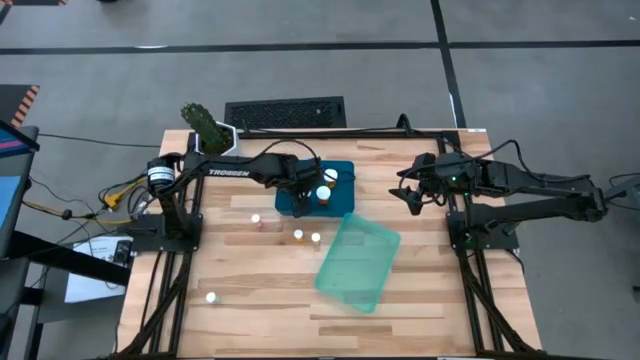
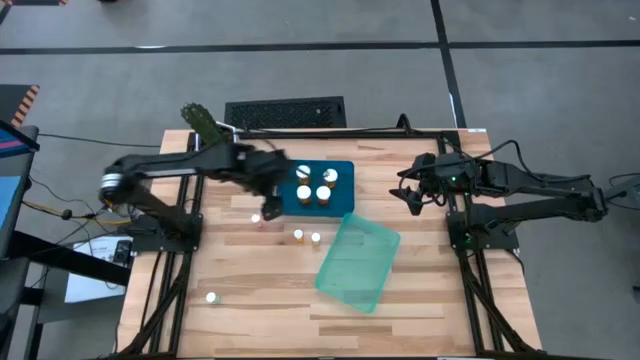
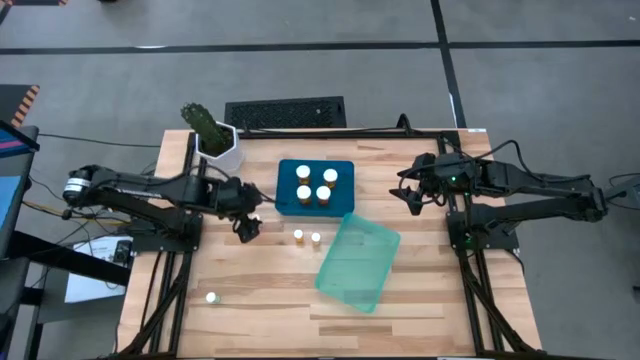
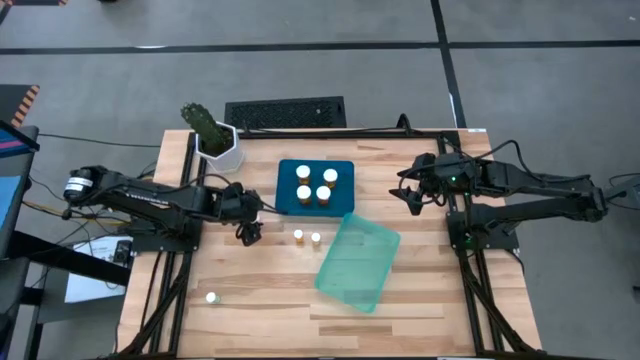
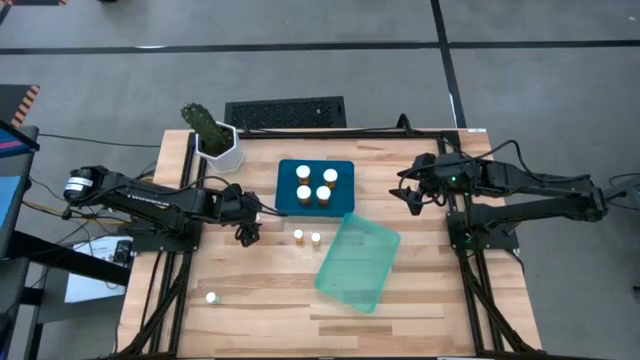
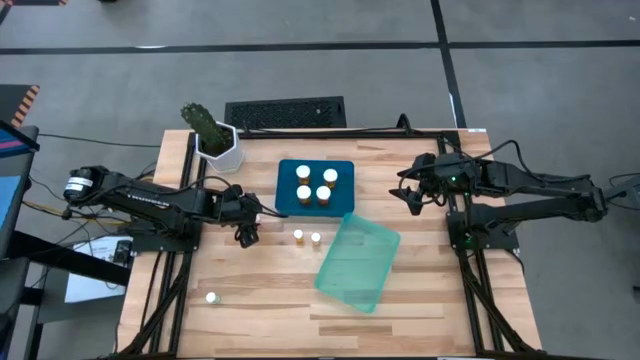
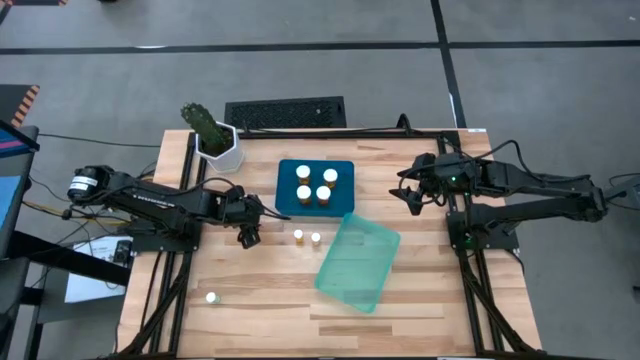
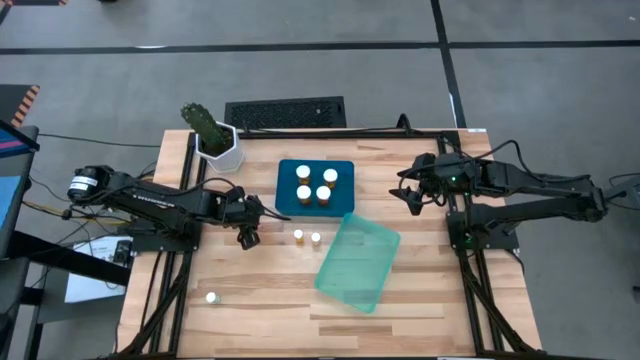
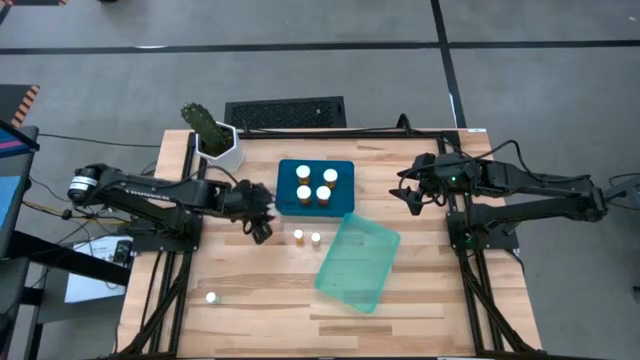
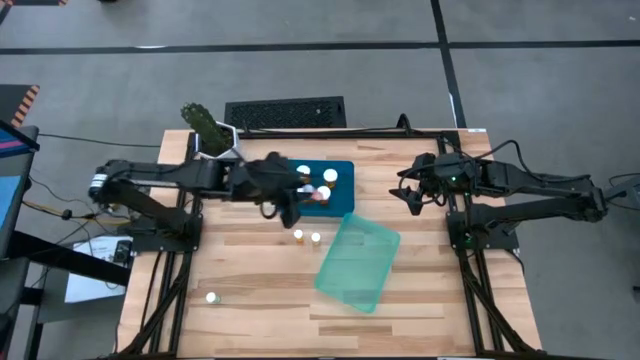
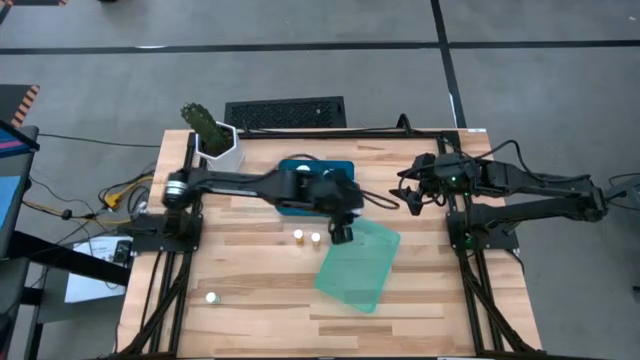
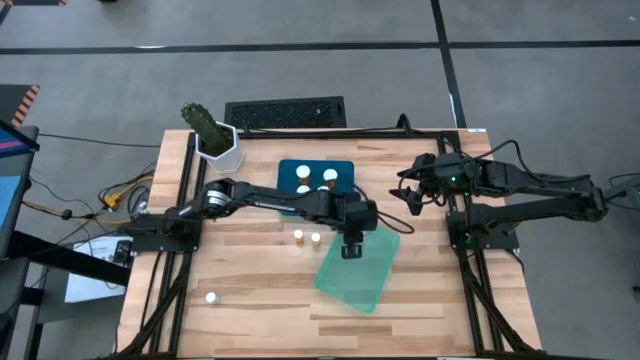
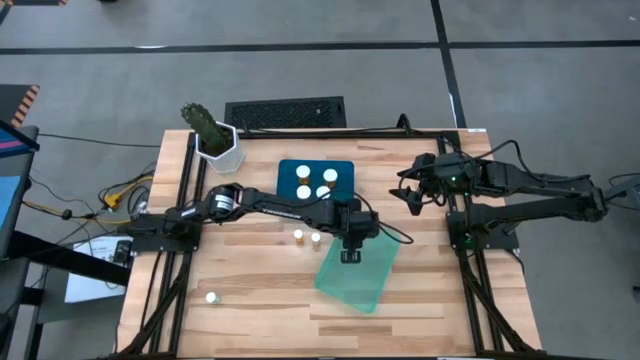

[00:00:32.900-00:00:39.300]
Task: Pick and place medicine bottles into bin by pill shape (circle, oval)
Put the small pink pill bottle into the green bin

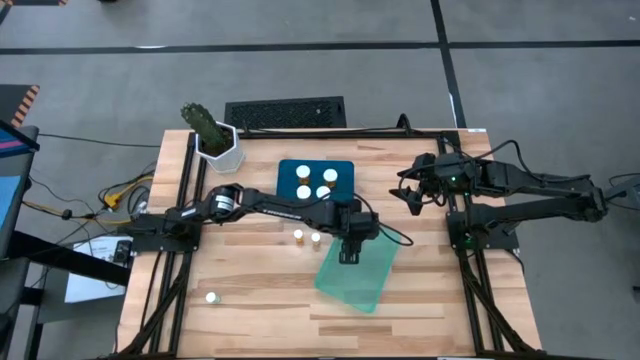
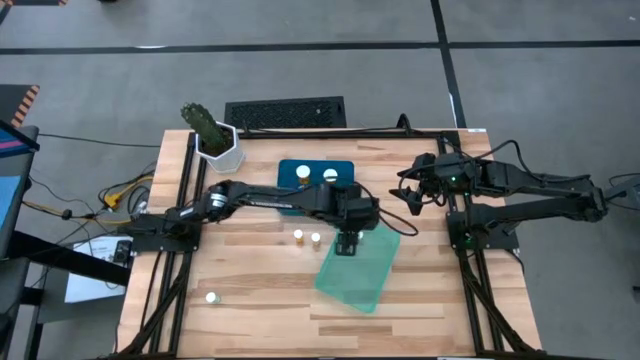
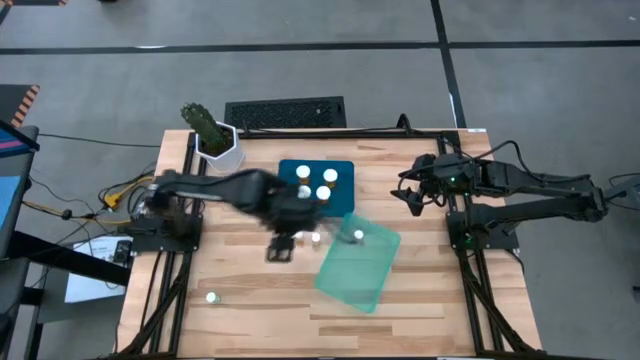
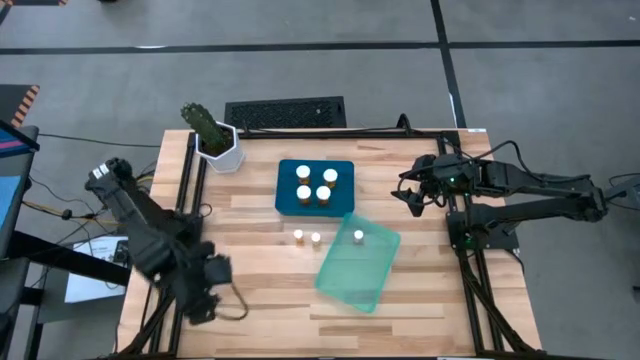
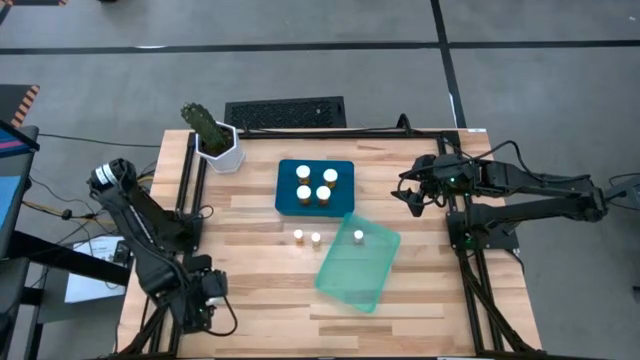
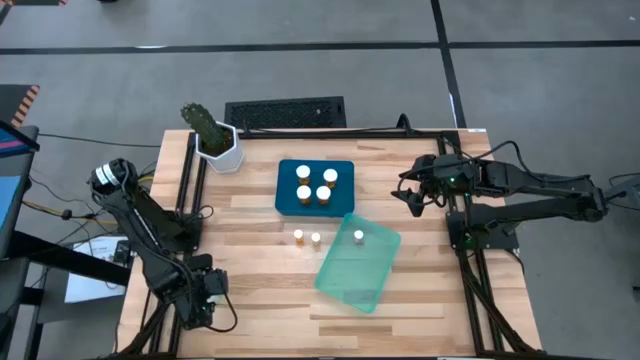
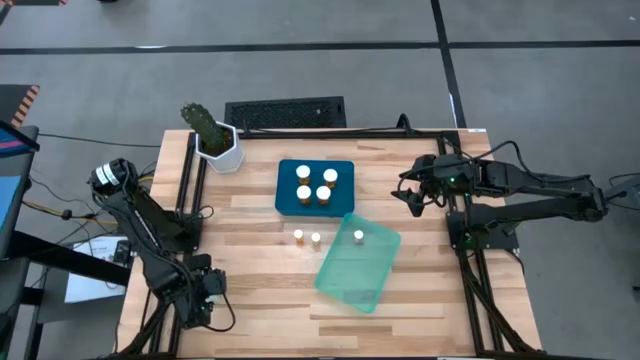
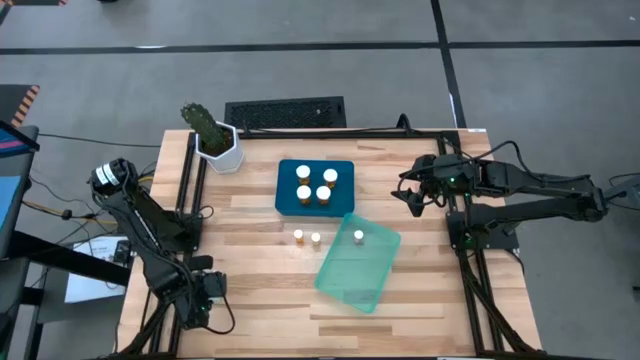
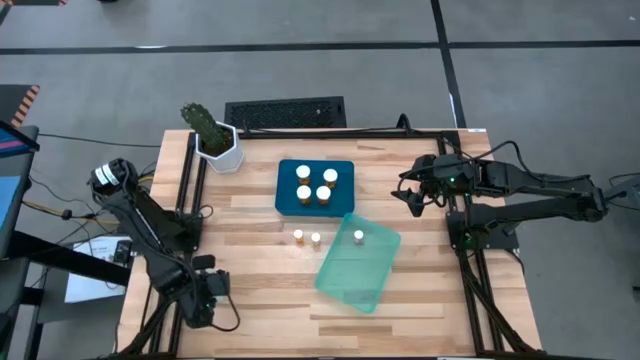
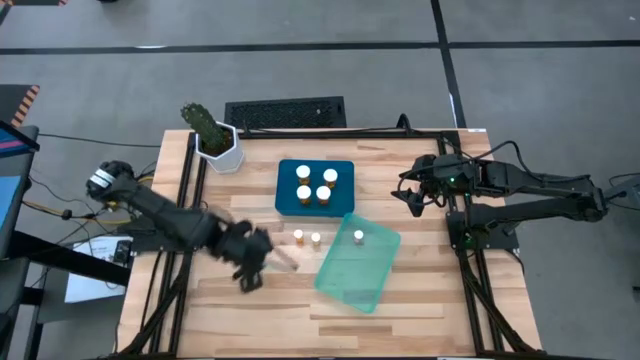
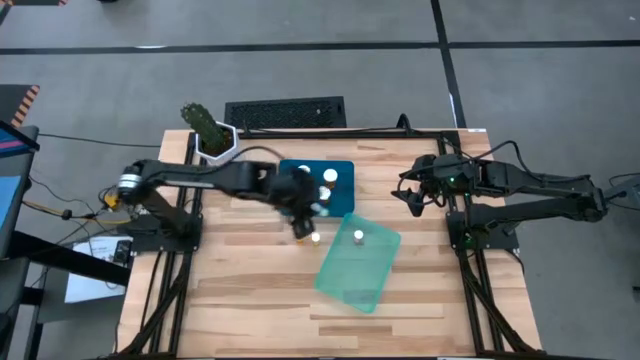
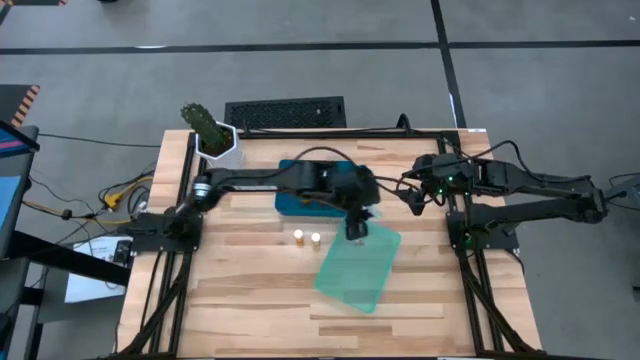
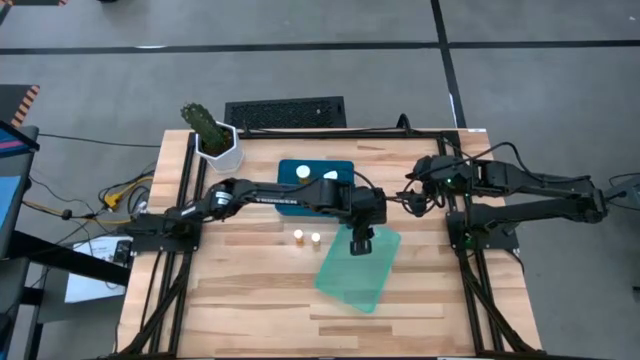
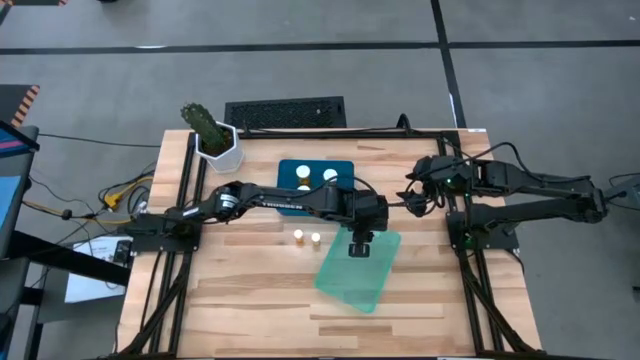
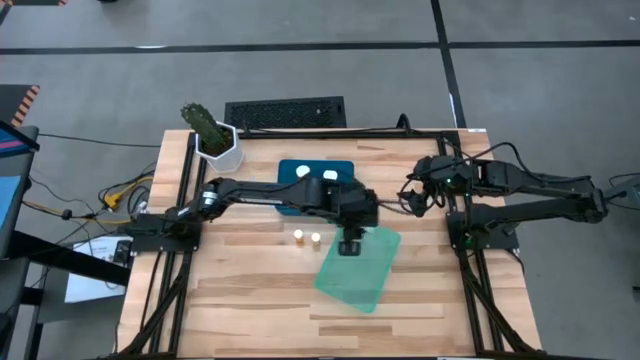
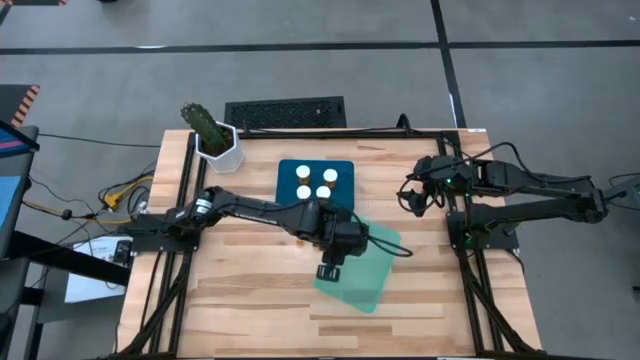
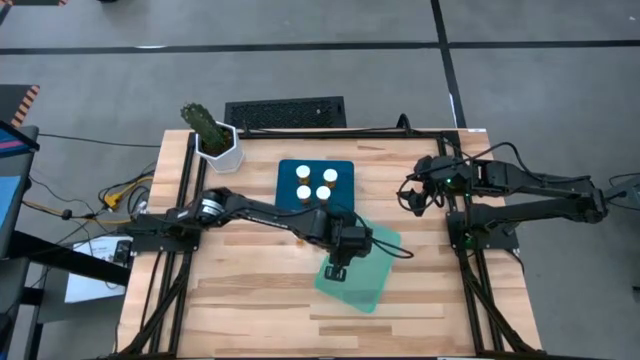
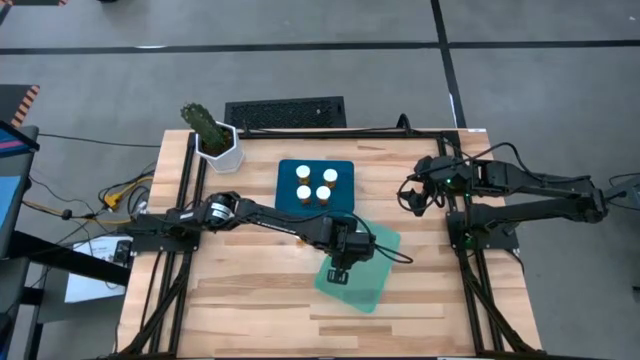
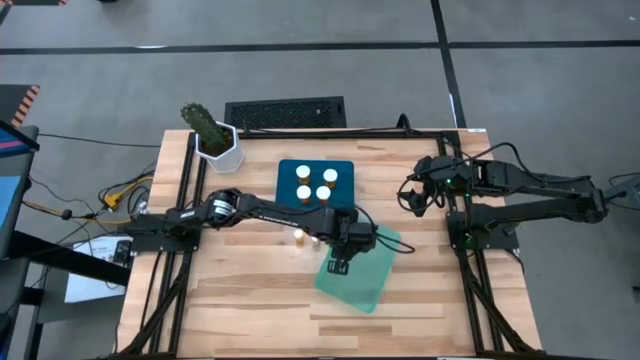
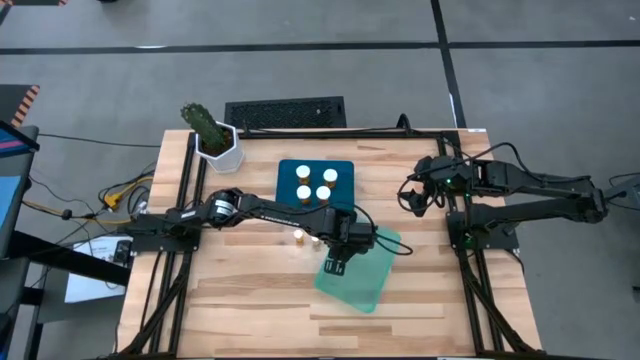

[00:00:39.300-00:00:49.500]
Put the small green pill bottle into the green bin

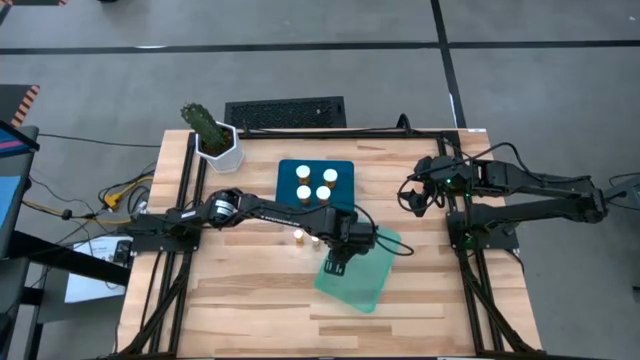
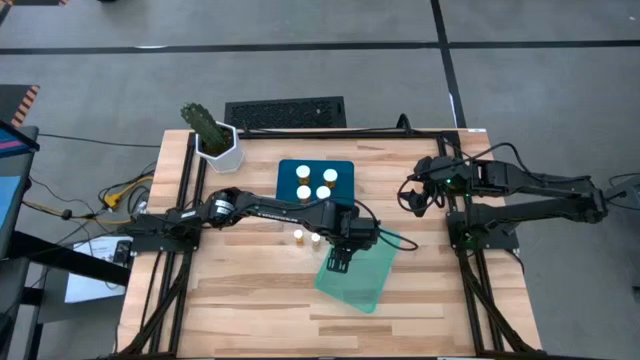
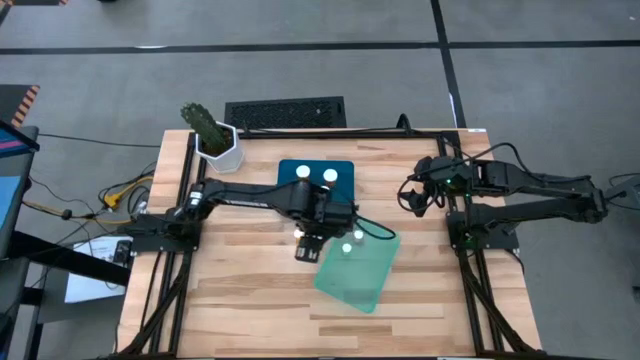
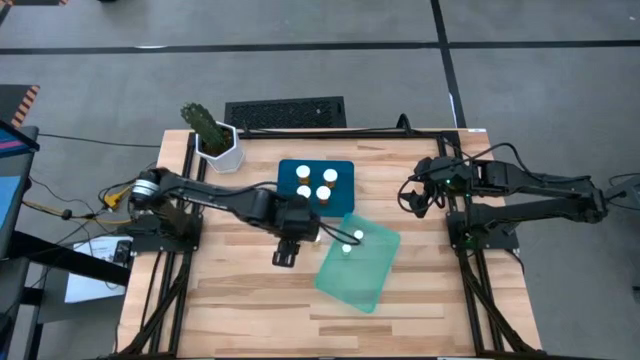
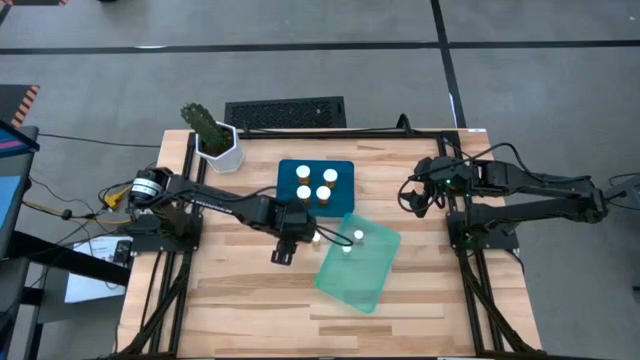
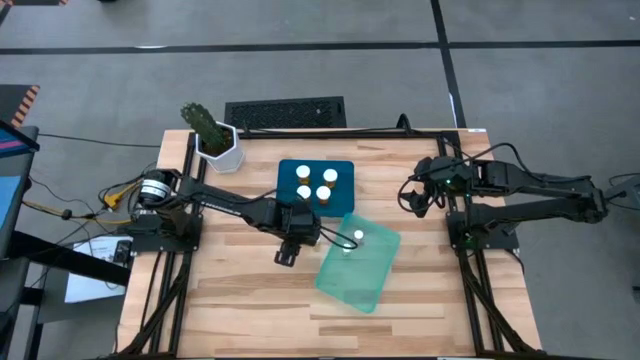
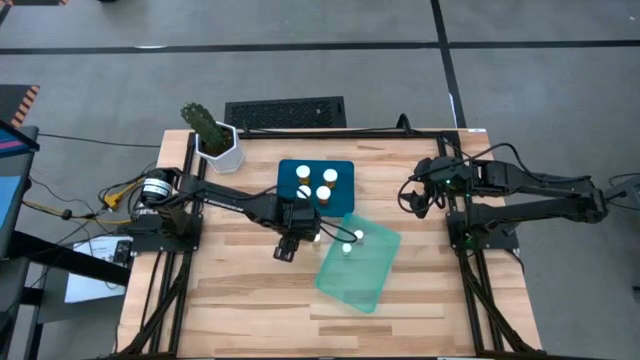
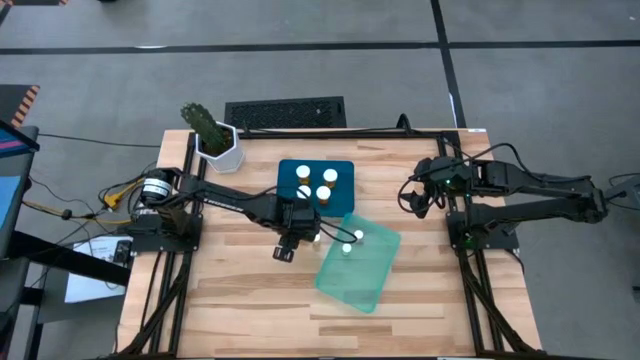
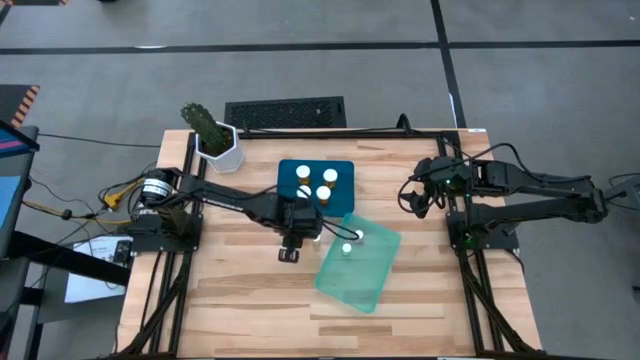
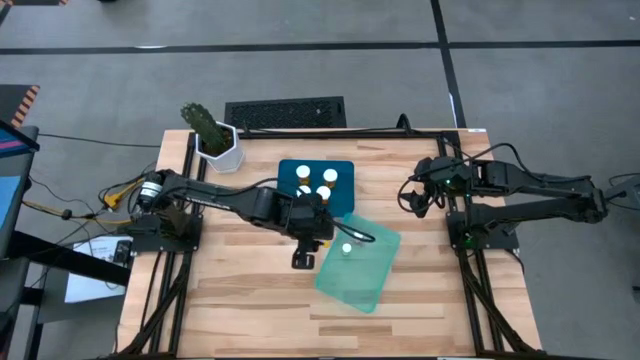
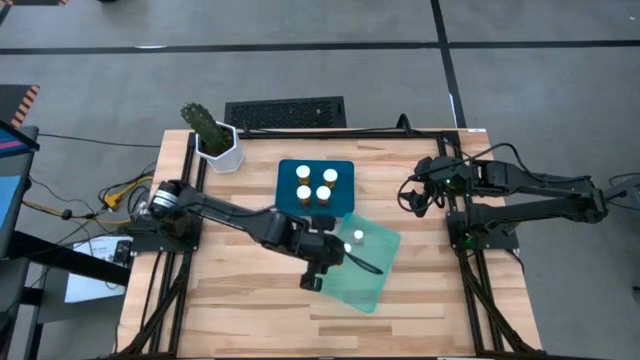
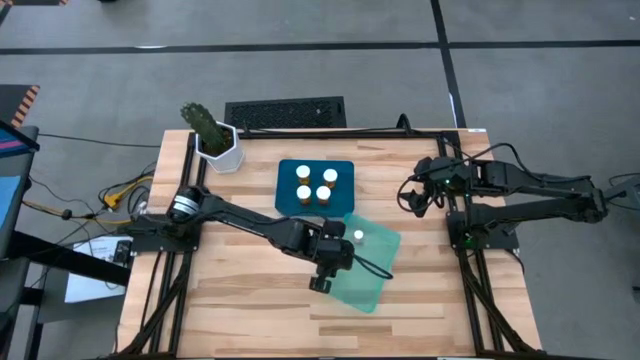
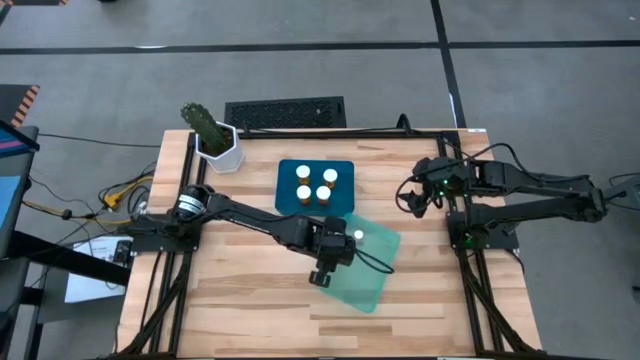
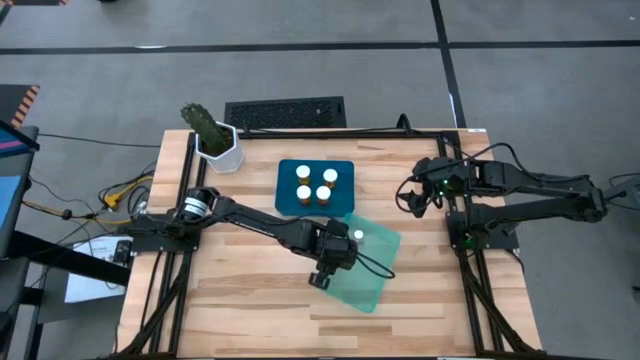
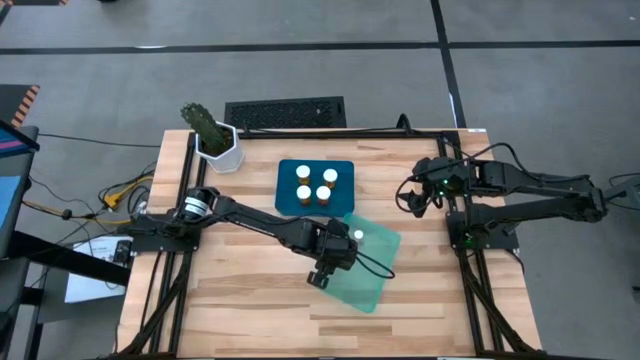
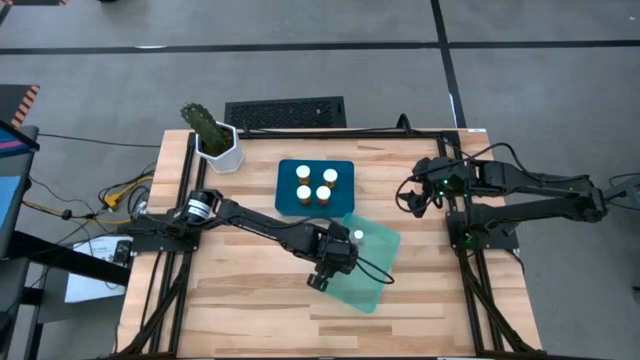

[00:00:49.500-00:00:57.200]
Put the small orange pill bottle into the green bin
